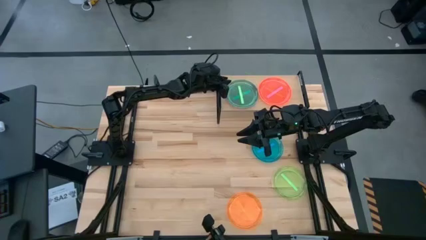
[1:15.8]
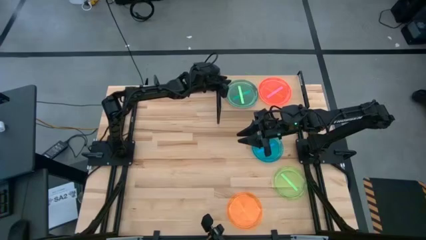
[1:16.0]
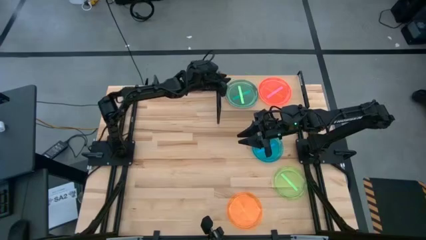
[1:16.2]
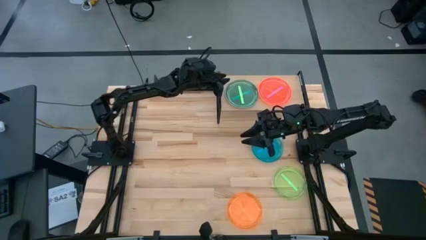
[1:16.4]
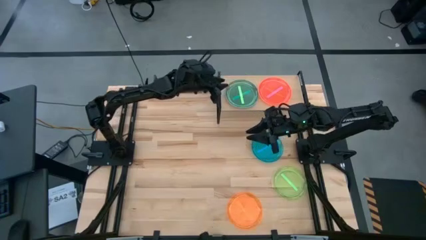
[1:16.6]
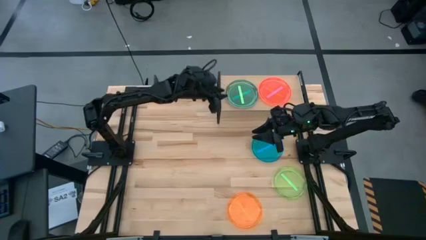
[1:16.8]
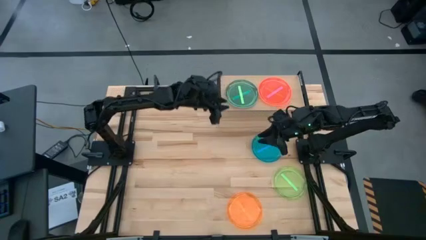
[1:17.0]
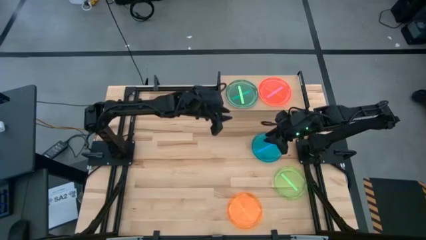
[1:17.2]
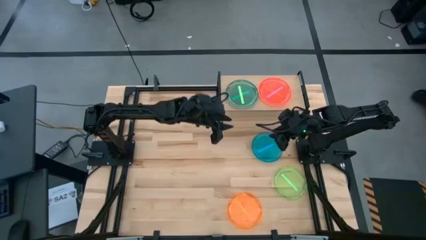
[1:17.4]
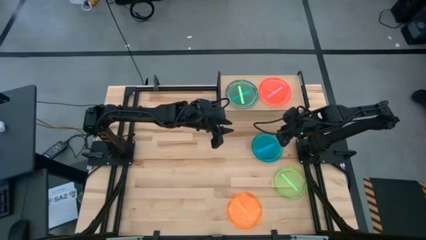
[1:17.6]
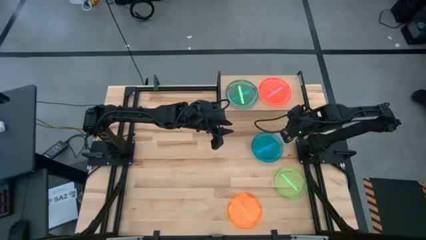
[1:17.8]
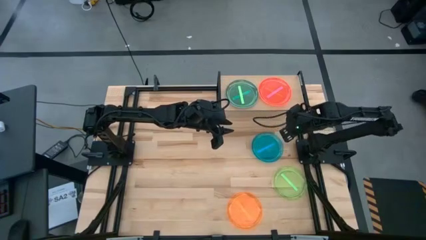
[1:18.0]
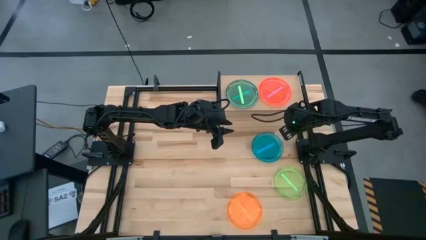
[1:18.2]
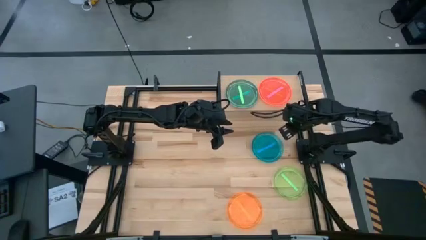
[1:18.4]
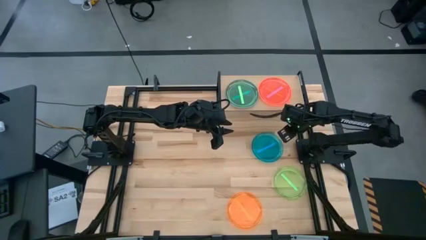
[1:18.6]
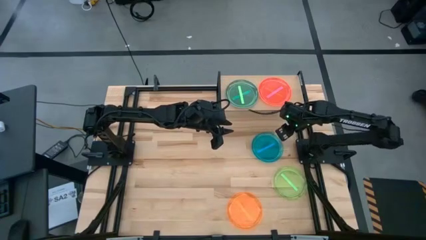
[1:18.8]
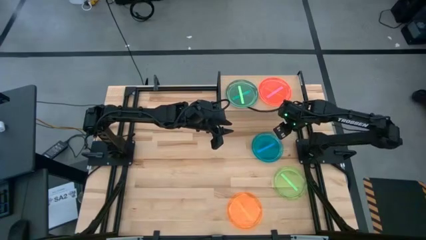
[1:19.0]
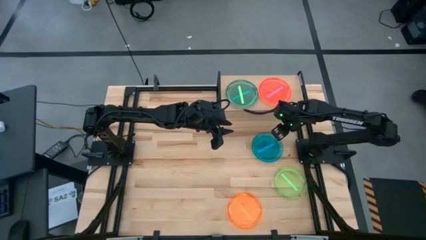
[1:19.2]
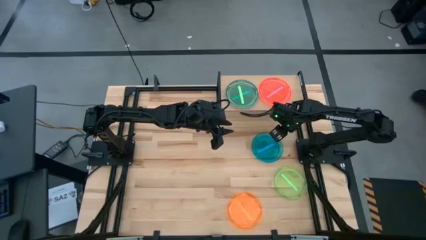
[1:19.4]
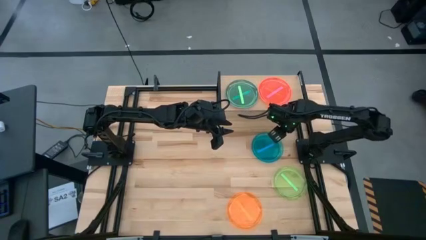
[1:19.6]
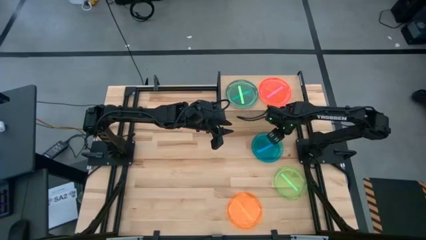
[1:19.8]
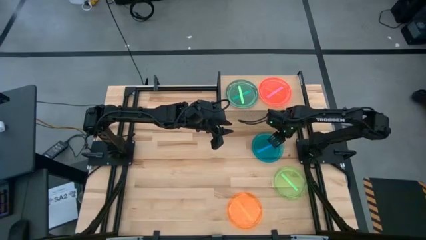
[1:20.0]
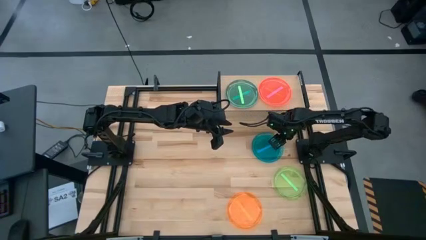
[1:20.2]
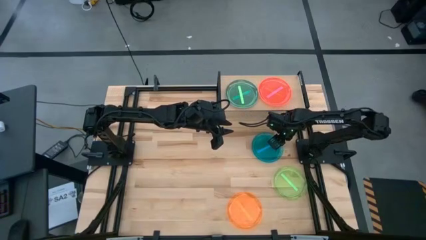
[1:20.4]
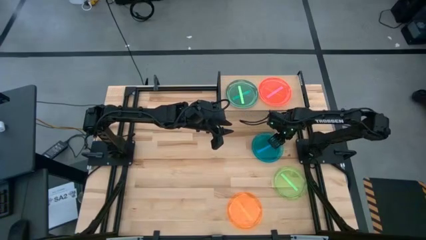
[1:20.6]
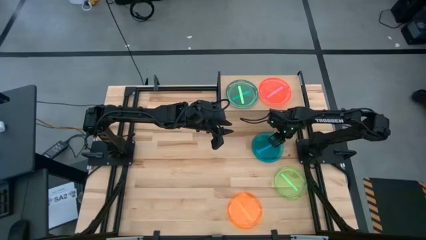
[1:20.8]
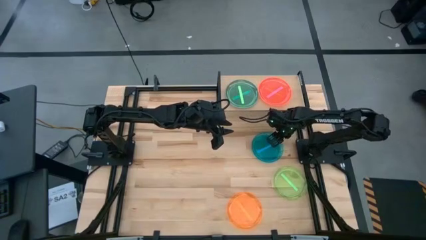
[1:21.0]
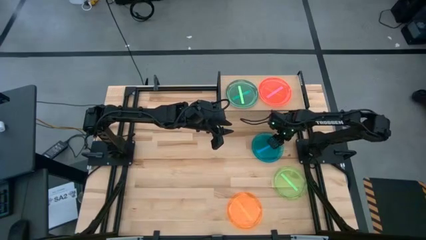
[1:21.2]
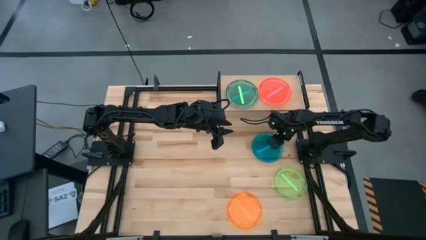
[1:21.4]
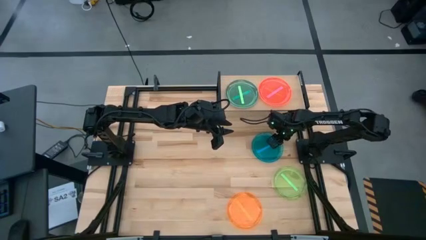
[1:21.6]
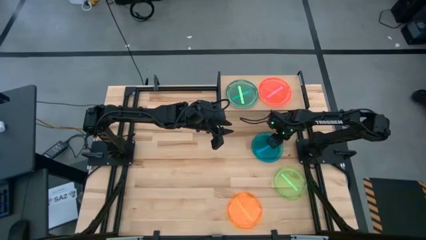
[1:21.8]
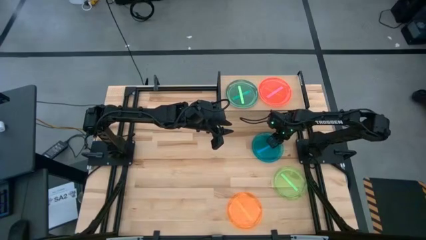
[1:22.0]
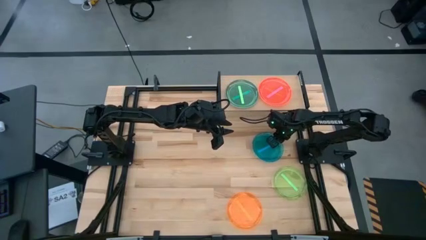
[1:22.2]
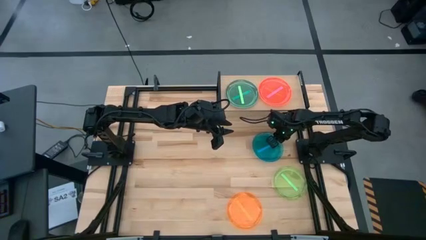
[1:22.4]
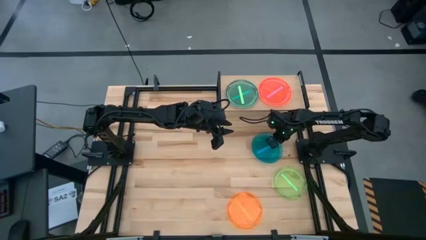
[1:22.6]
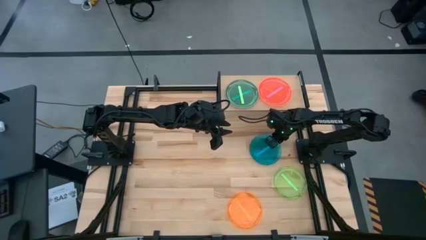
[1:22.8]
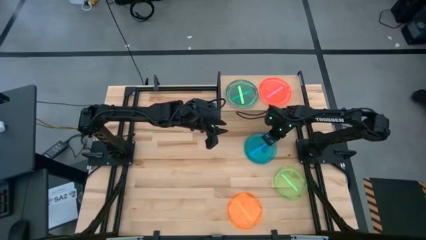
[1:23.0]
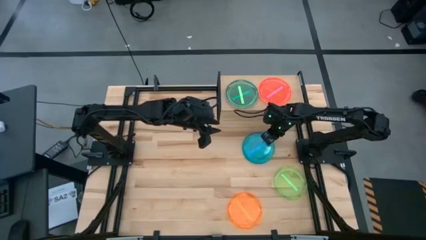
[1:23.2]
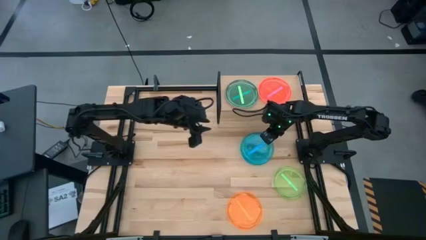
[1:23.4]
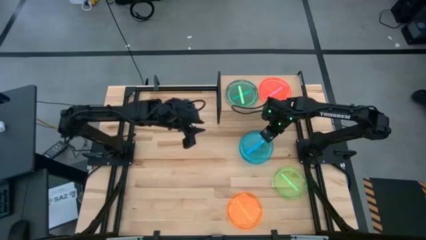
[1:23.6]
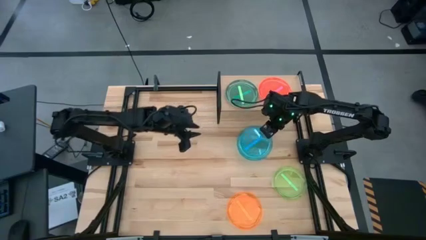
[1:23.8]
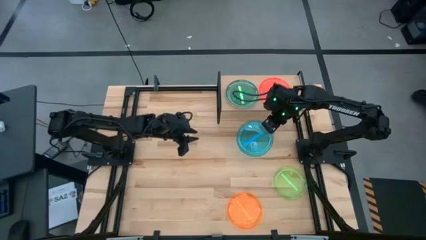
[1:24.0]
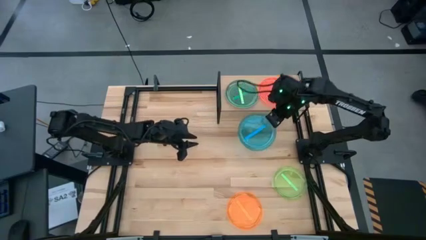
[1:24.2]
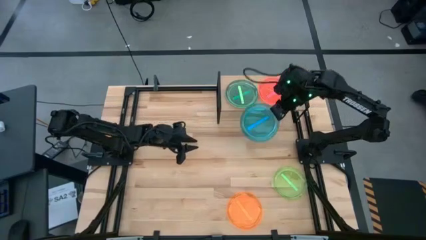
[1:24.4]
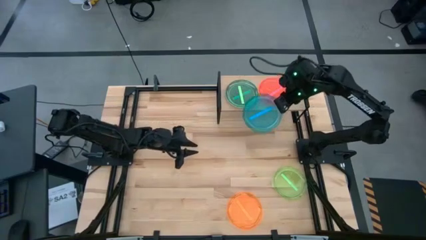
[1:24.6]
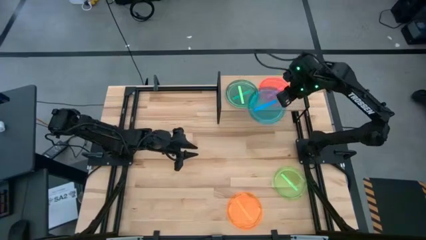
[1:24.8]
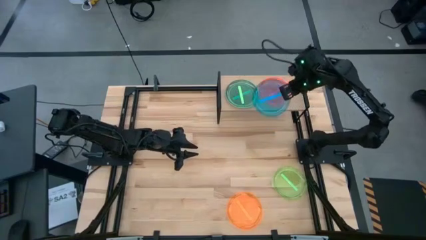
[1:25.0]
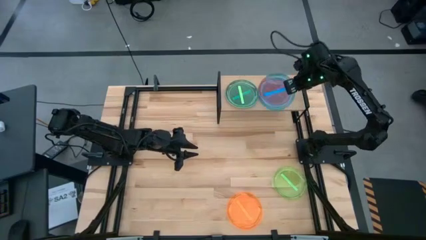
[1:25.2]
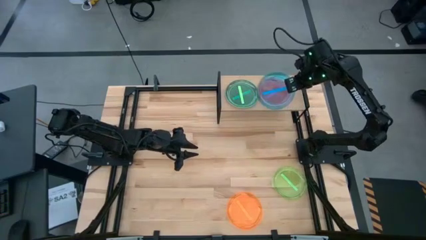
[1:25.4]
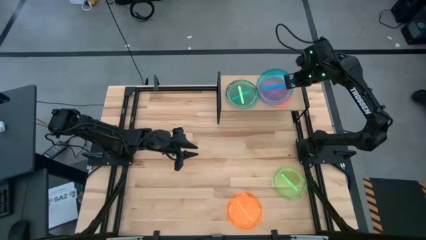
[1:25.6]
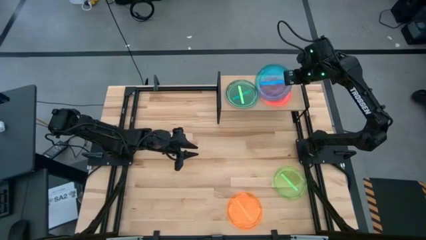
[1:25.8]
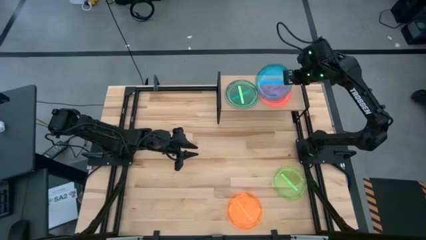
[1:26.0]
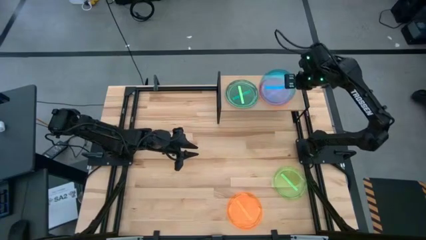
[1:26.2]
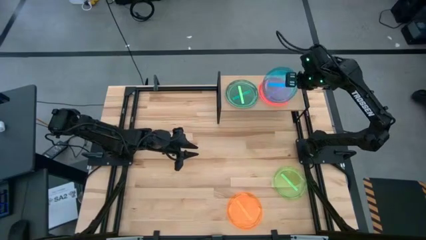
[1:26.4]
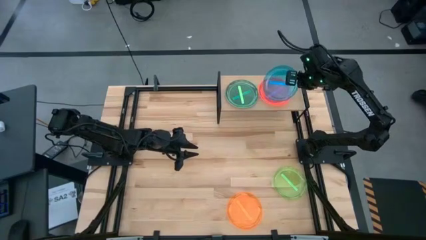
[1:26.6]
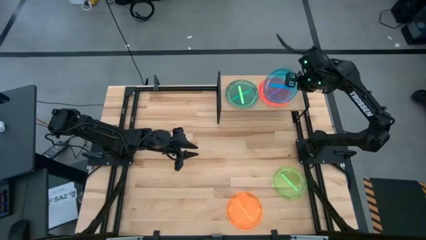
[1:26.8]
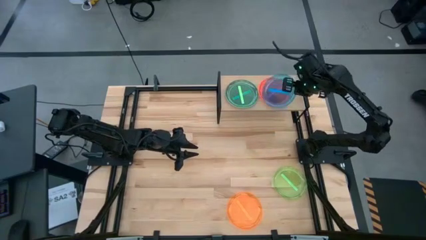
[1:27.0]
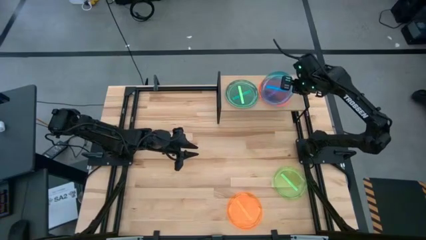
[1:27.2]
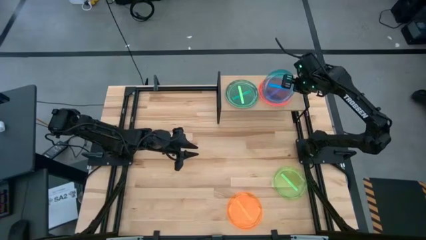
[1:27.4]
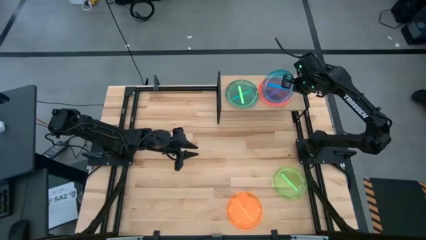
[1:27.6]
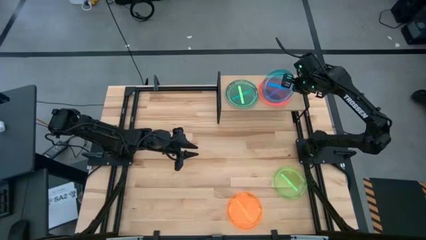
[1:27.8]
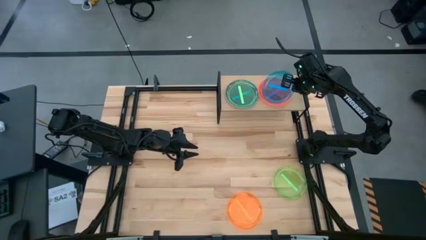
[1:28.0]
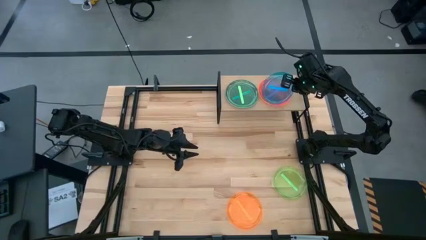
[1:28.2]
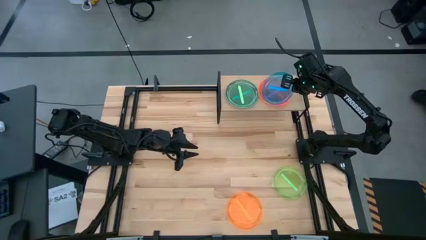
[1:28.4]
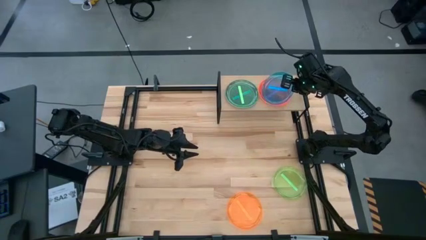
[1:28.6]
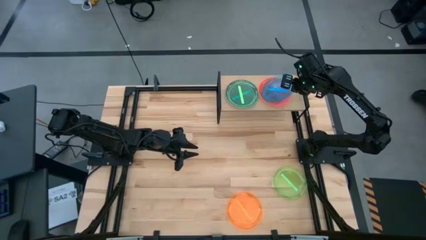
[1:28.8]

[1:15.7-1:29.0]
Task: Place and stack plates onto a shelf
Stack the blue plate on top of the orange plate on the shelf
